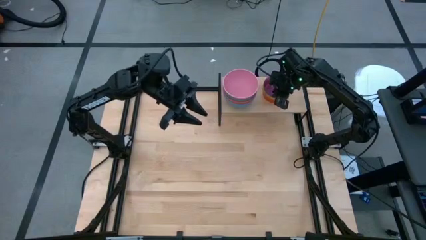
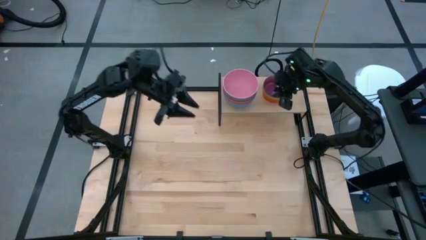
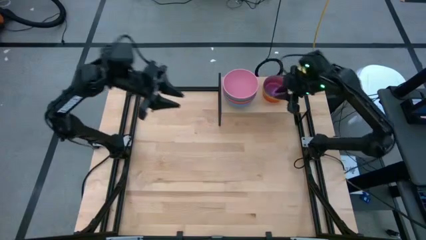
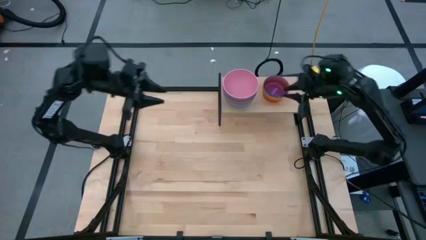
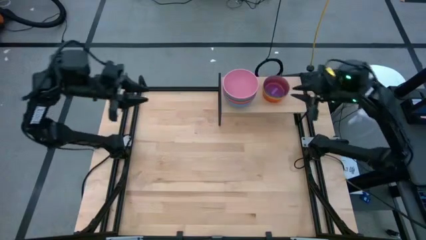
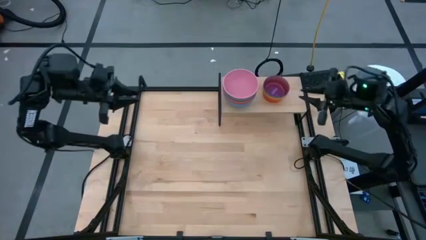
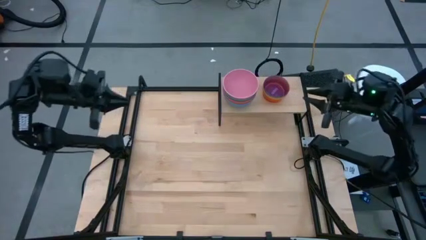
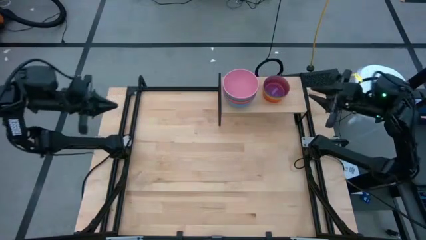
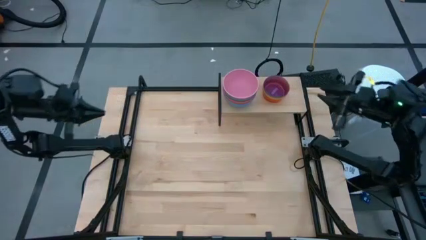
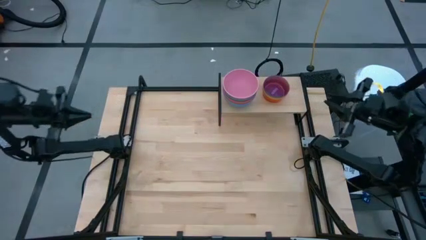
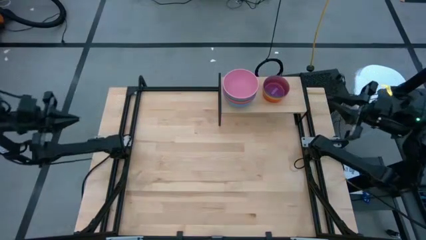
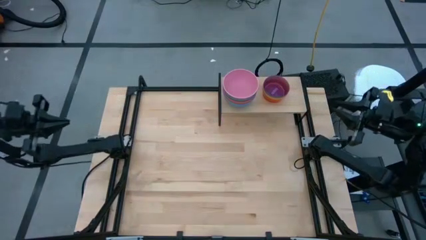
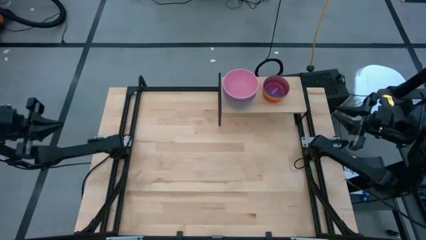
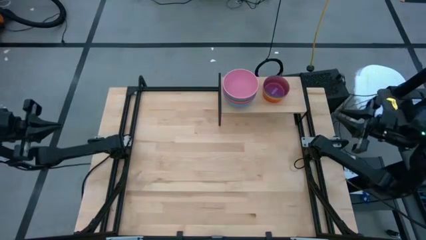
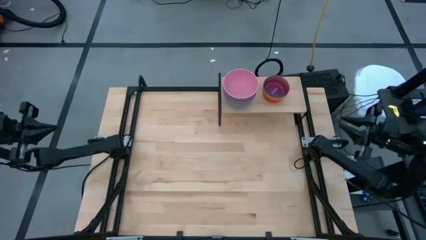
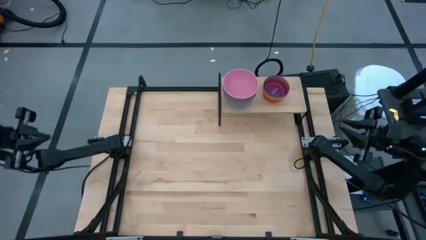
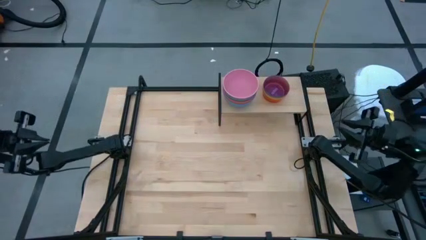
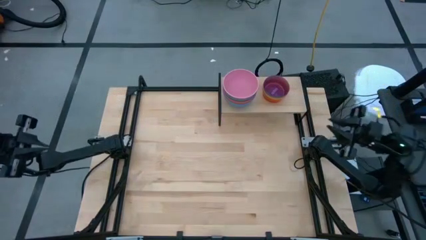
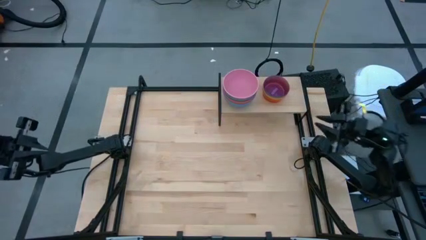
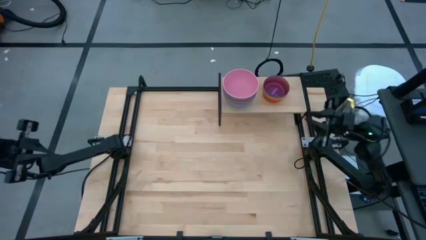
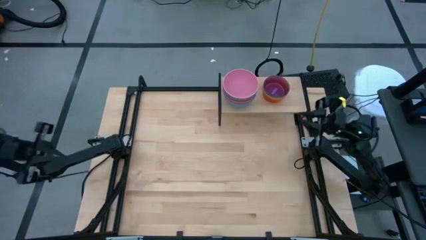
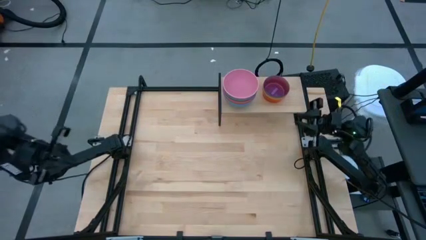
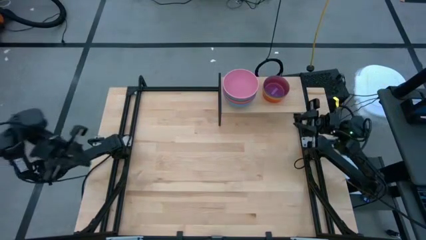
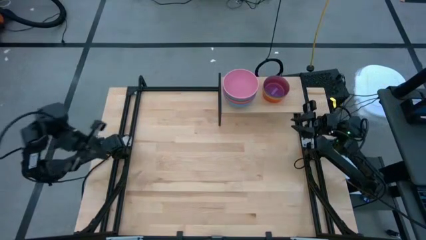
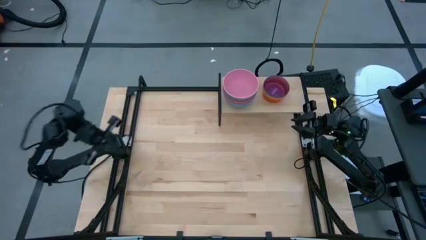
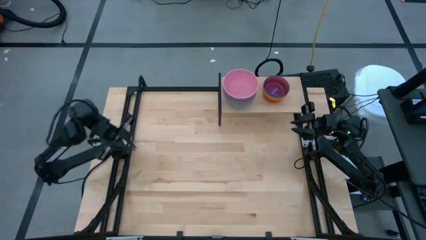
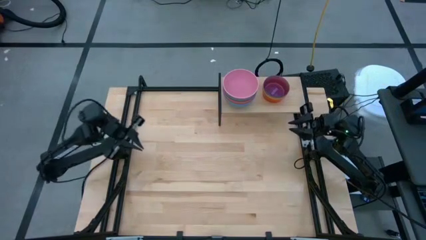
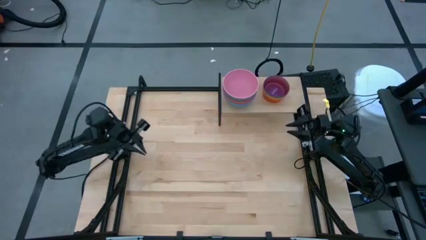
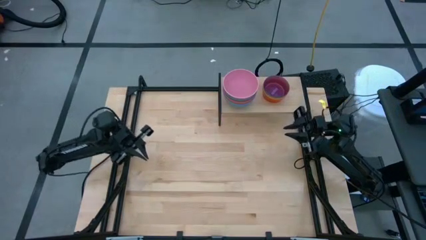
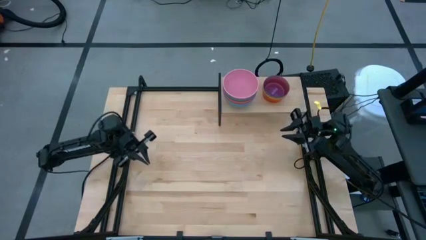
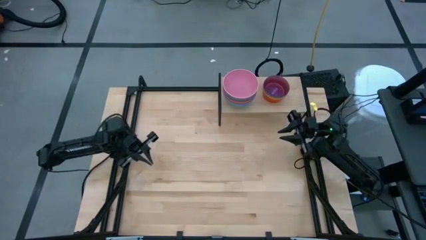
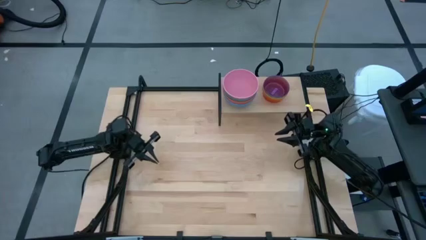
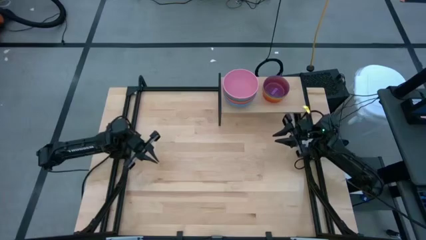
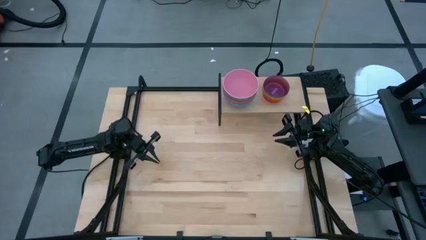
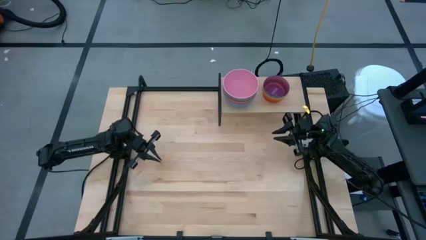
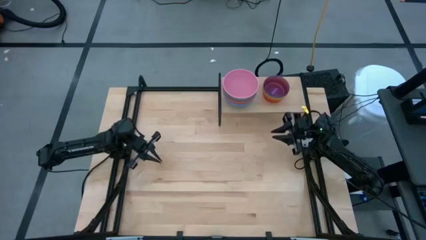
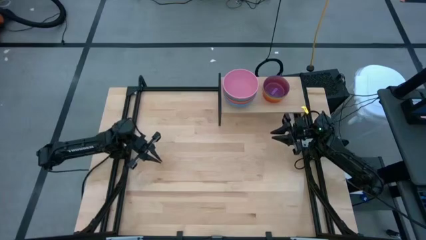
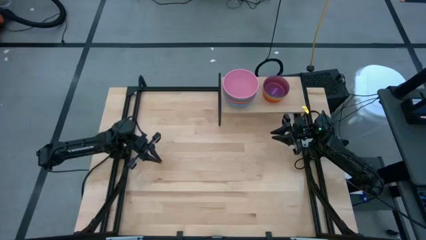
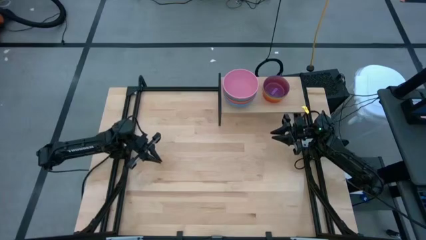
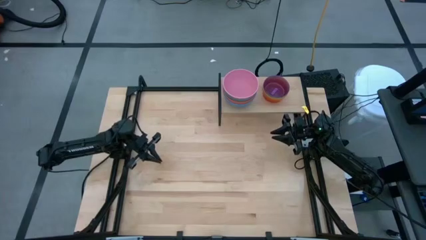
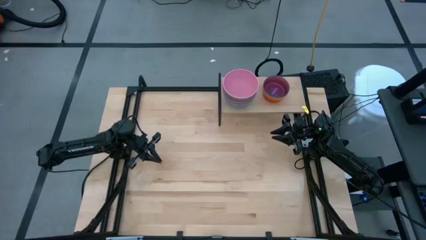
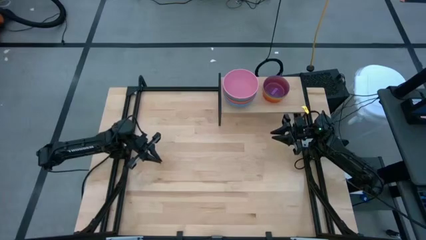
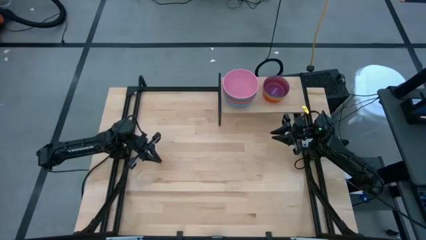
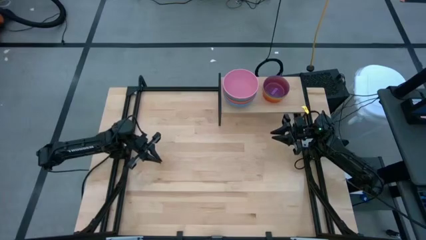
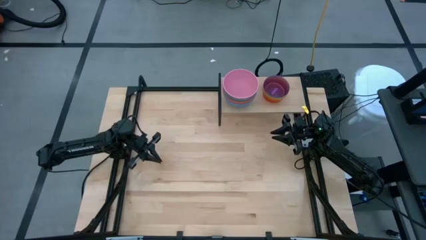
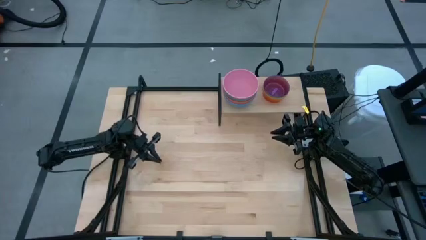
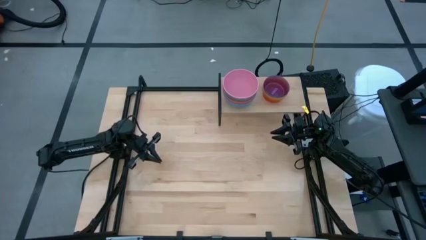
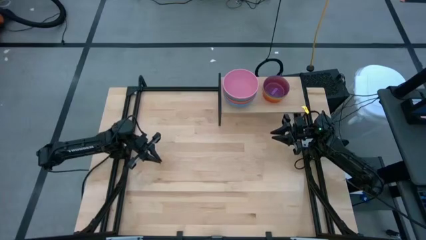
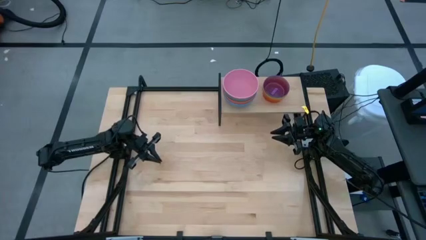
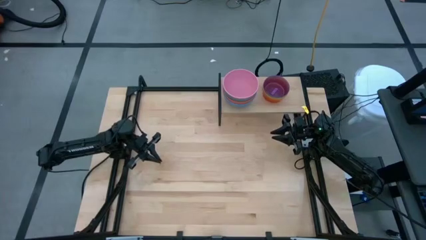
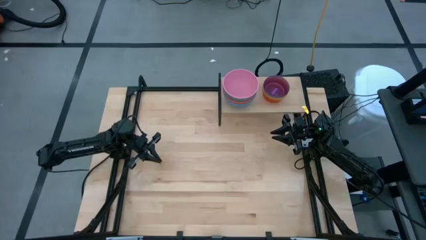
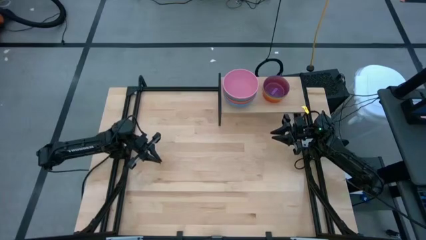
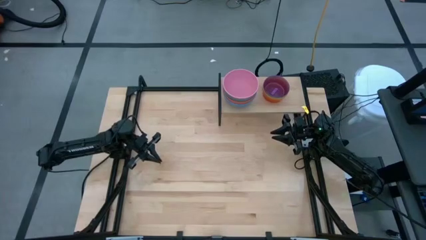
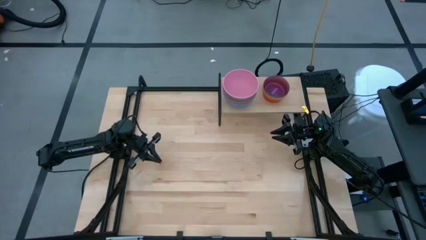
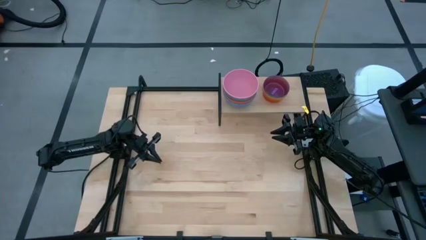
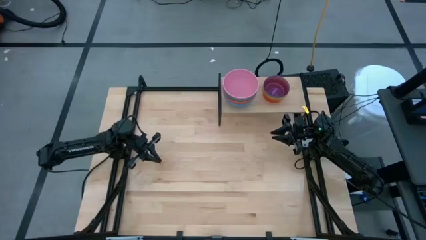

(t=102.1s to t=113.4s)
Task: Place and stack bowls onto a shelf
Return to Home Position
